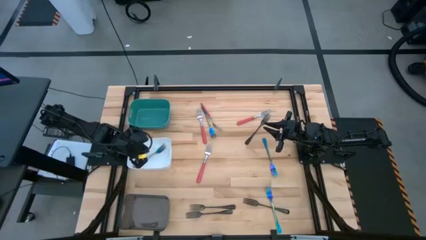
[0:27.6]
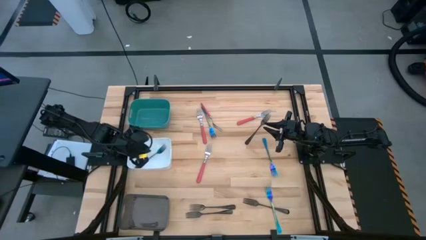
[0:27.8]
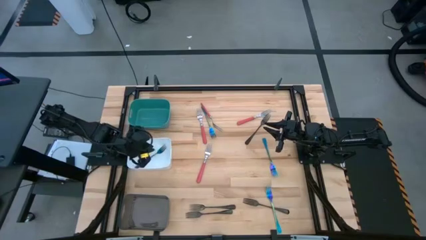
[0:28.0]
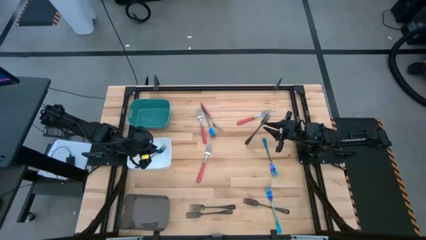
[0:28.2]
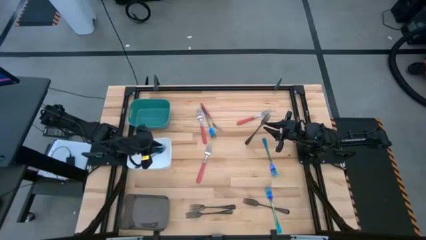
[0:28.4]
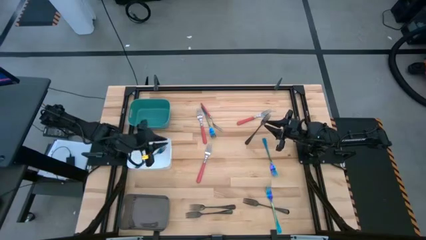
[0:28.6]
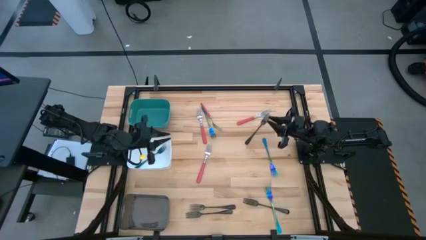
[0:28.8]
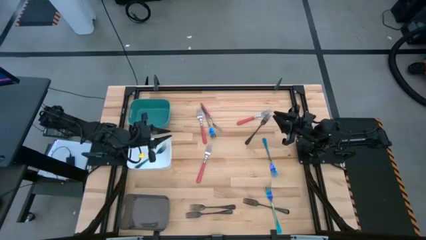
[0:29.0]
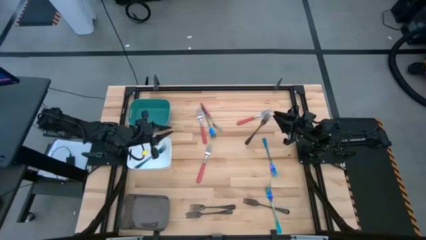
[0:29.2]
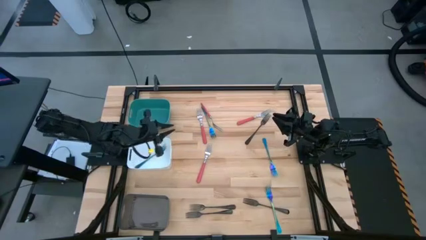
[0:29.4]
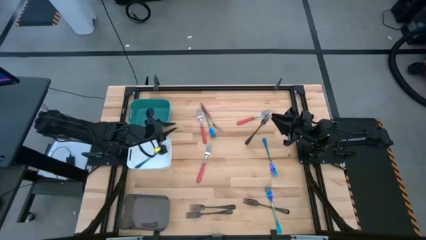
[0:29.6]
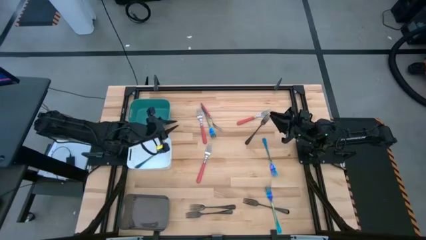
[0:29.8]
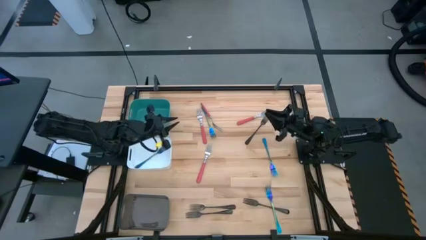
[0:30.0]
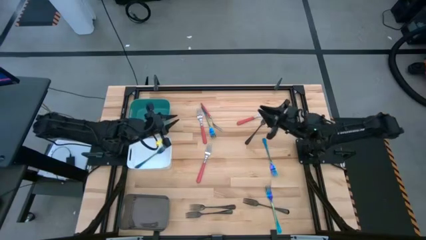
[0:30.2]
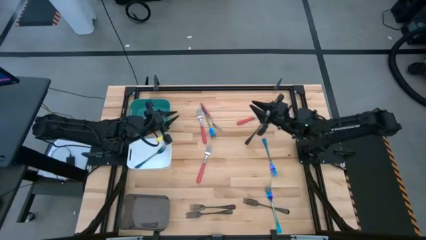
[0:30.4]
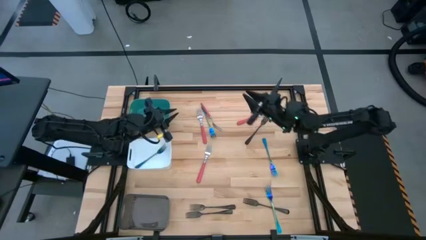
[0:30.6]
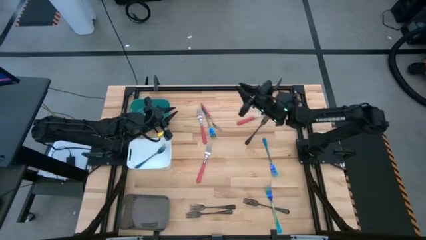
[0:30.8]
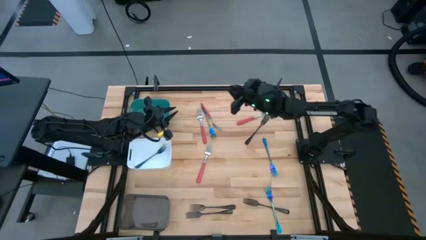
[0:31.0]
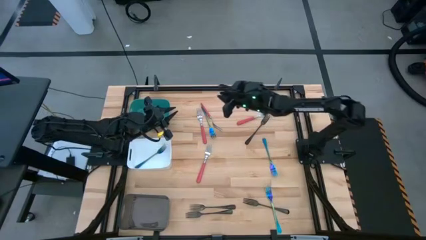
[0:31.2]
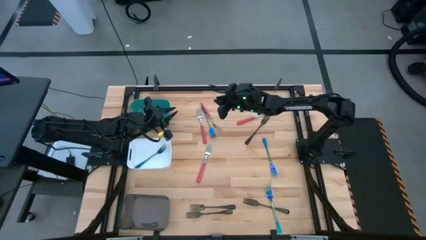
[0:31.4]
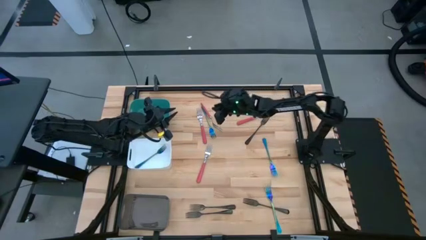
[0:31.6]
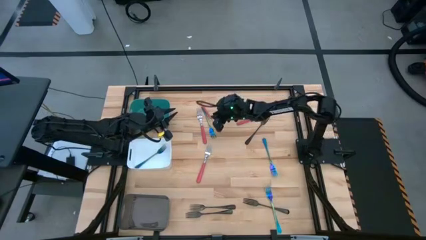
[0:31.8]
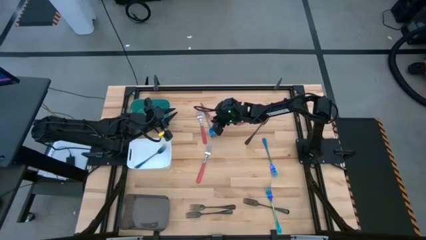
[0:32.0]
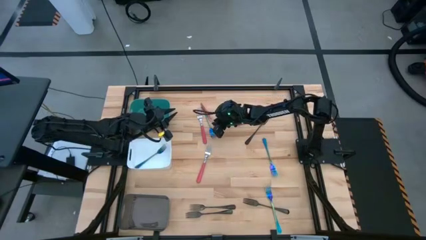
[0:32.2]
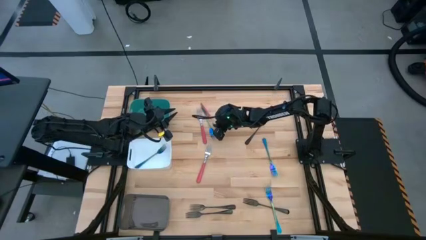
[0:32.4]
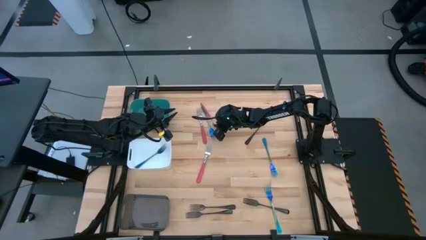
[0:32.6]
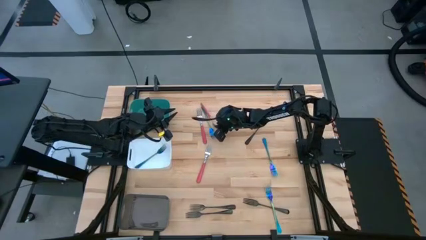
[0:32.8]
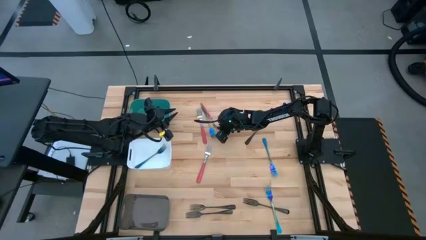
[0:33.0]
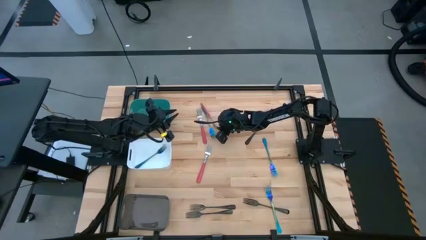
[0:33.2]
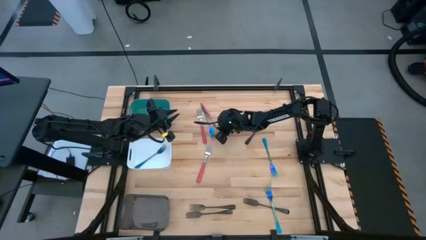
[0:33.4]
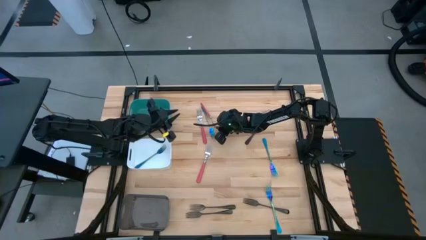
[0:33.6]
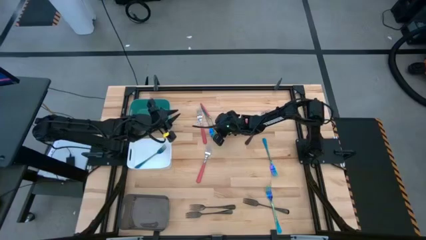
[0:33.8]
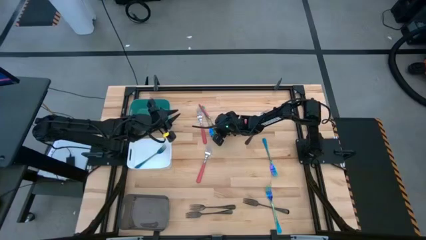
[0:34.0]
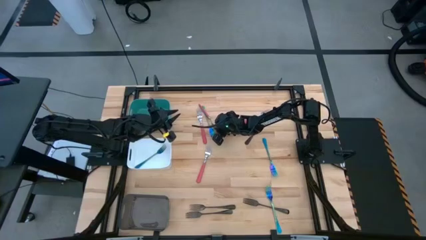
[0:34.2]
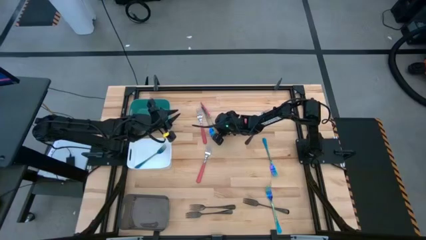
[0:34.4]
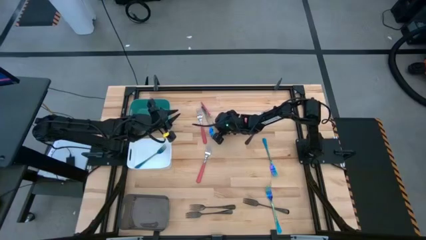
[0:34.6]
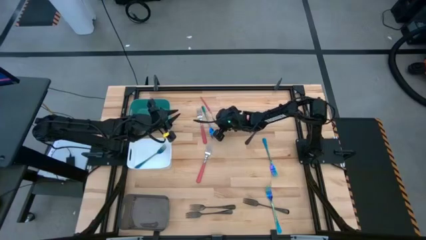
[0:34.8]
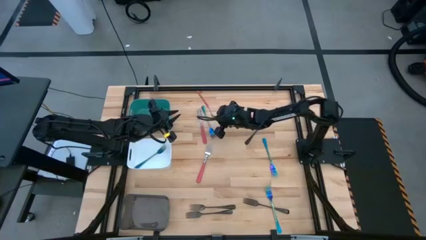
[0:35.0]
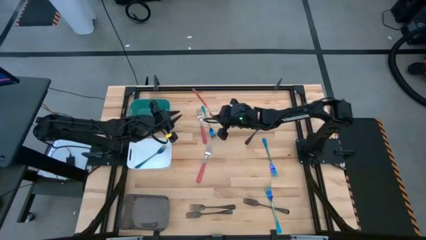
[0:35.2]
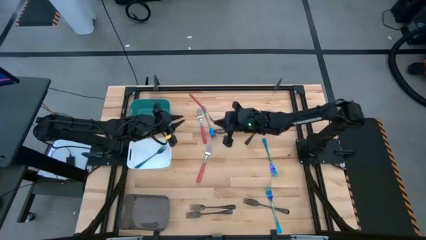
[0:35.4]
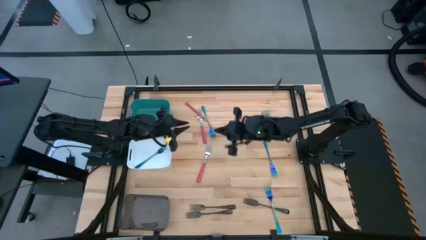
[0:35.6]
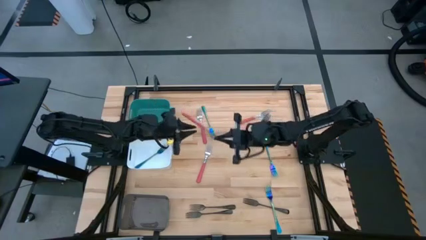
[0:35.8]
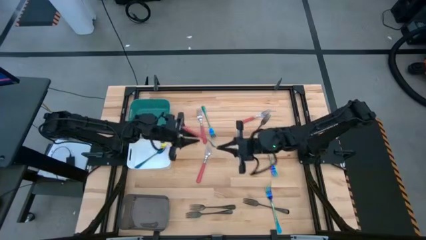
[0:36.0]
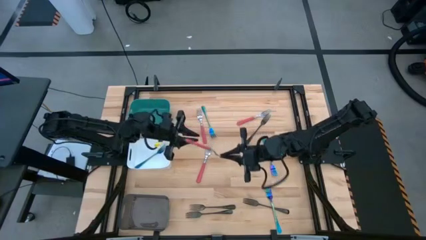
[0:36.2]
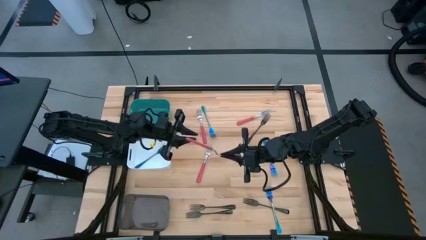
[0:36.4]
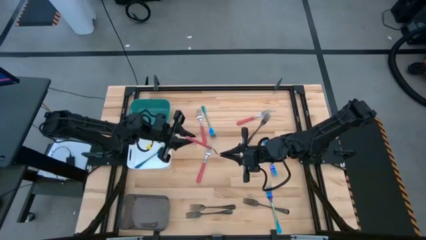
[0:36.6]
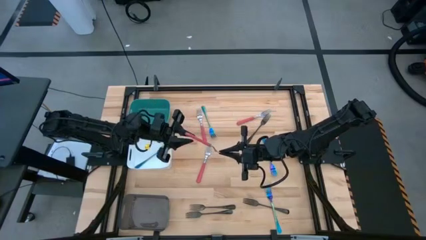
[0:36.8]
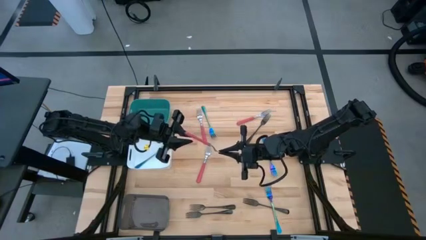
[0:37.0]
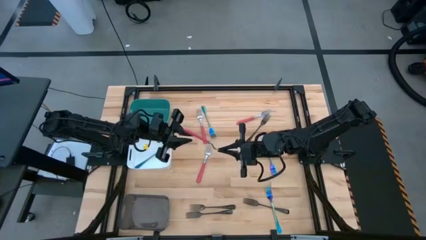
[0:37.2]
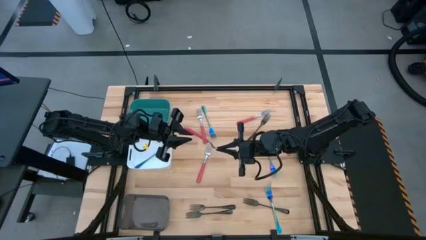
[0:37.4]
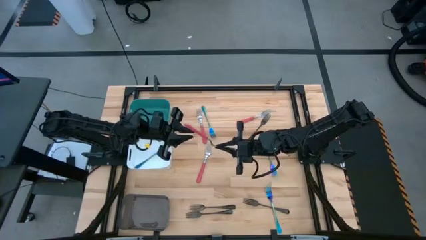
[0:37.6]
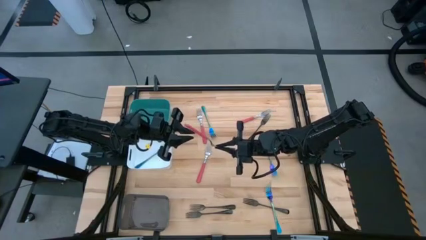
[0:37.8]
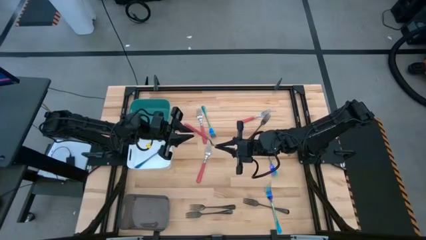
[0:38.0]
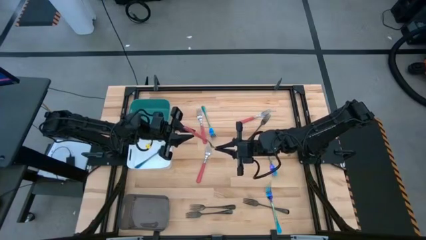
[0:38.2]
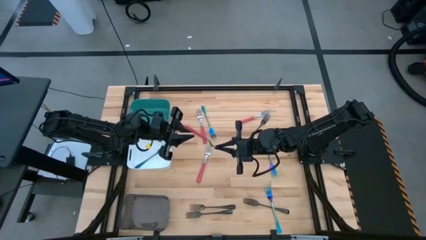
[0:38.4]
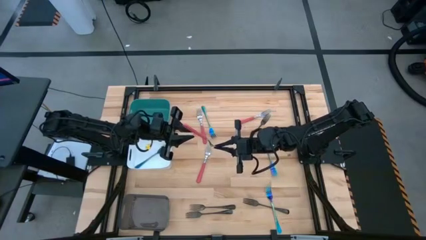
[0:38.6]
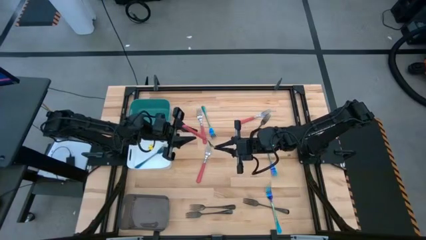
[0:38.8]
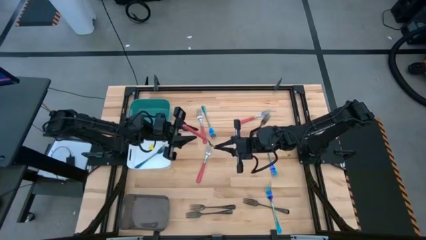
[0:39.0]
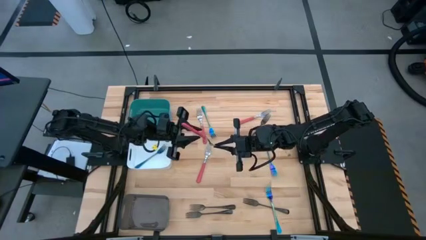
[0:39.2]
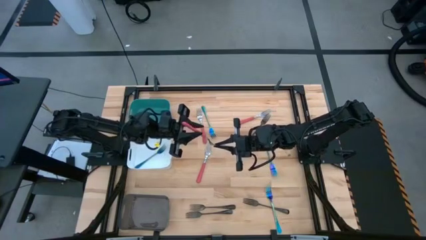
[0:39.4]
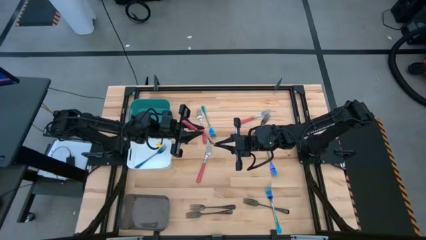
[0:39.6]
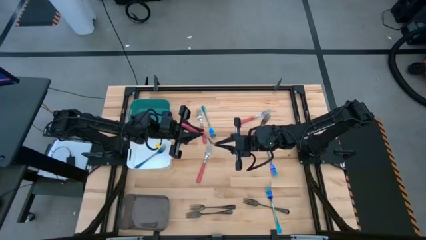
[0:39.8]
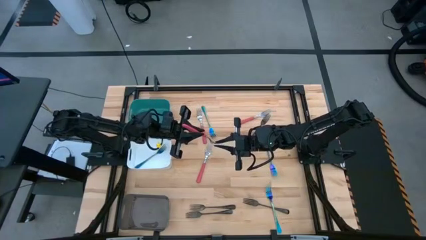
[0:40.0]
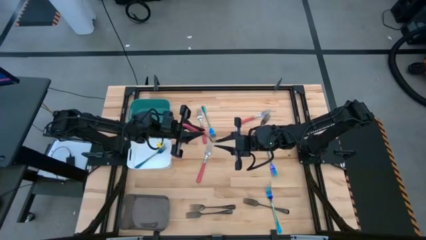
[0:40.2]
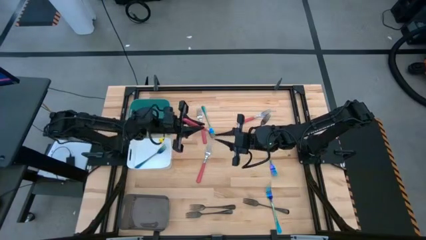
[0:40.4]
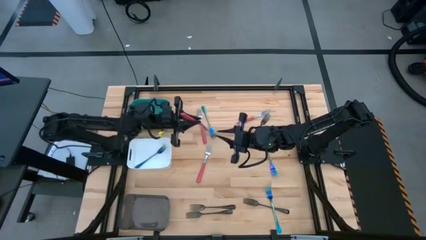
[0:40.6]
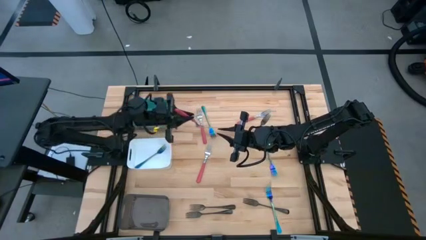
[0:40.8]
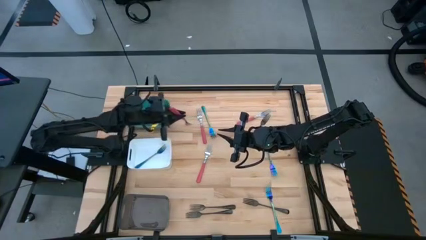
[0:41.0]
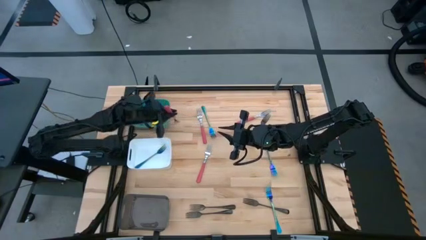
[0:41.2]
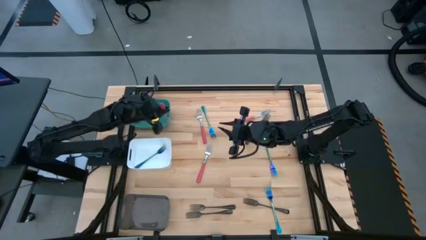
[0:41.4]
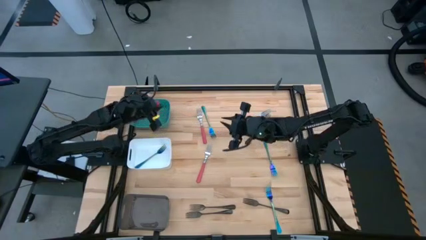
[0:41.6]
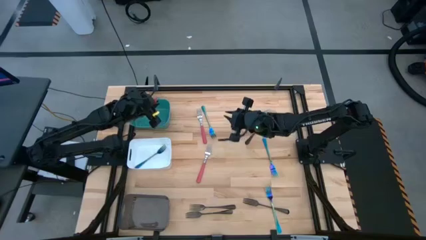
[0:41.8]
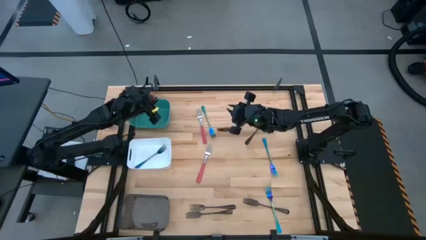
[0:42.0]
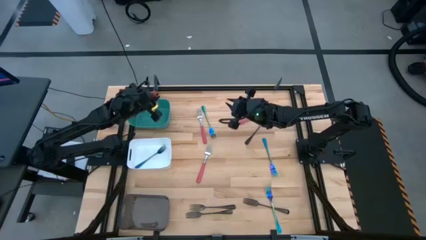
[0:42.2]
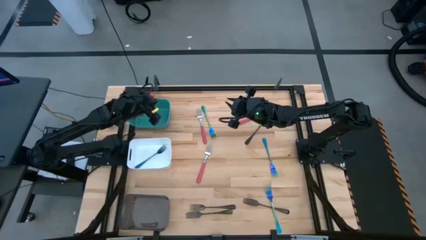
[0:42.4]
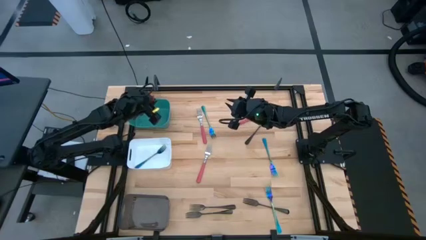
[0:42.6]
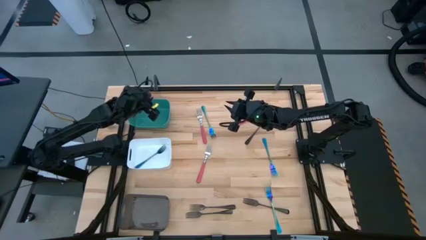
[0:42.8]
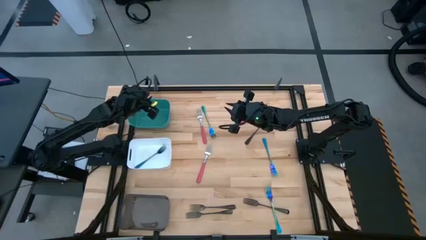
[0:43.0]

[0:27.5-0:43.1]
Task: Sort silverware by color (type)
Put the pink fork into the green bin

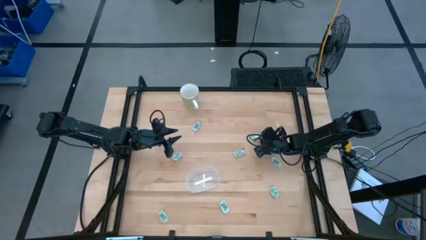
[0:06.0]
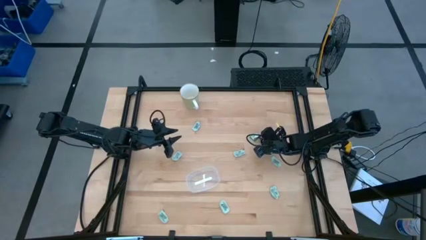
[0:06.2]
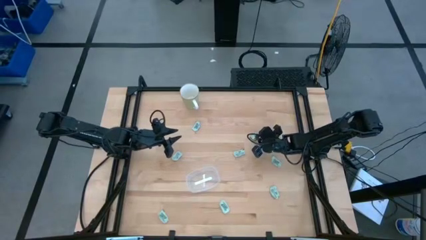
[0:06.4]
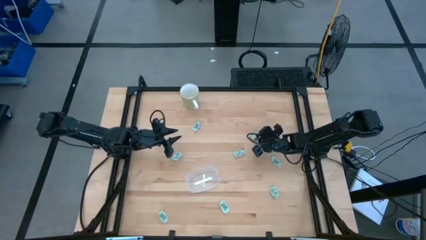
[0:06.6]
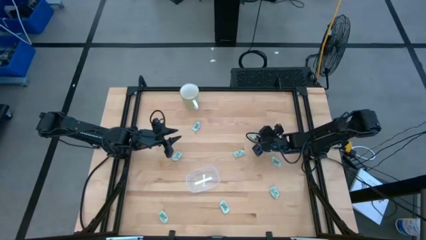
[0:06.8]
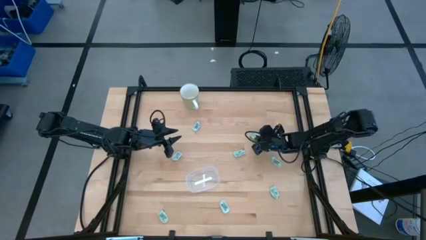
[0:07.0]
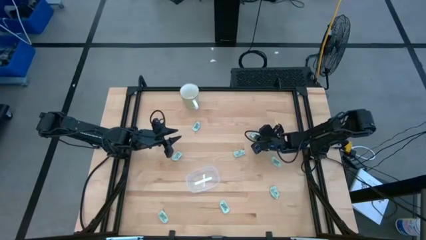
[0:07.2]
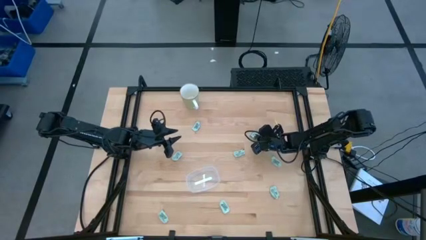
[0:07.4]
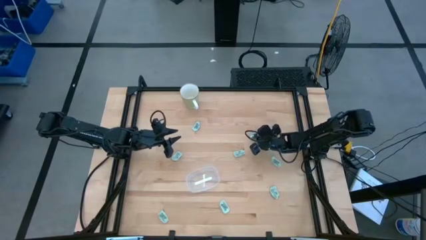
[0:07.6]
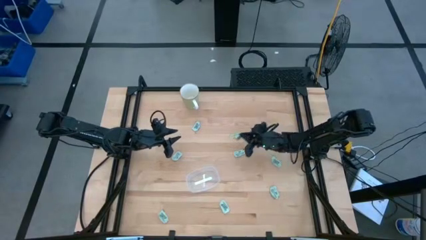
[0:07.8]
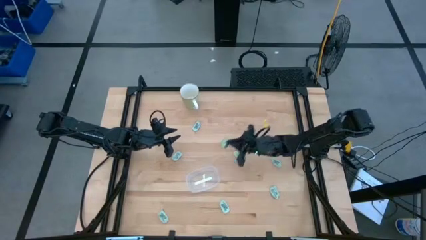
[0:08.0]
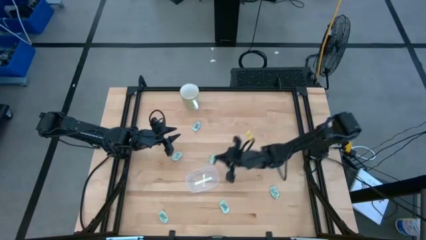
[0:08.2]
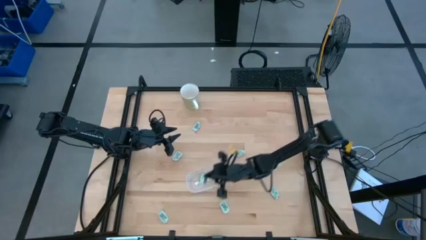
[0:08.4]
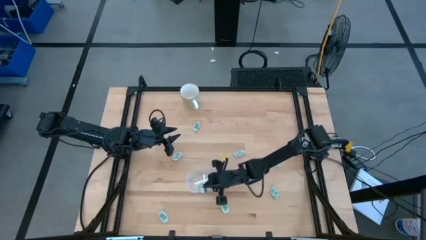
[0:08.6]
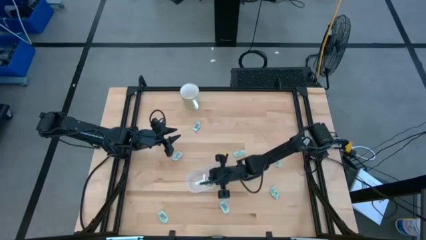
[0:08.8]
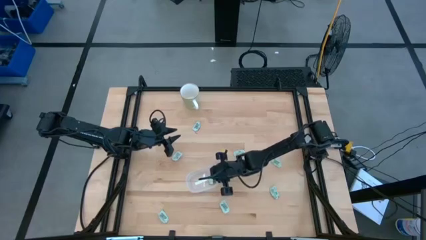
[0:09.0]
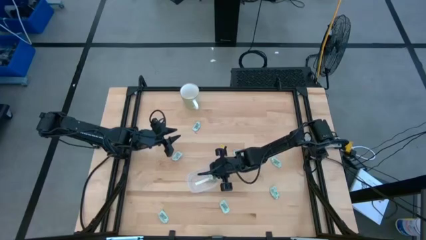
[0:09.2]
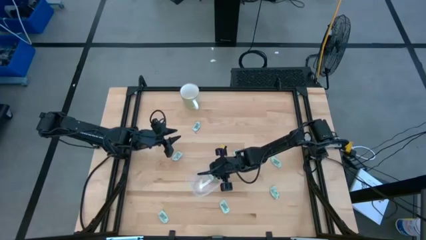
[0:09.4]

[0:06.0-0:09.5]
Task: Pick and place Stevia / Truvia into bins
Put the green truvia packet into the transparent bin
